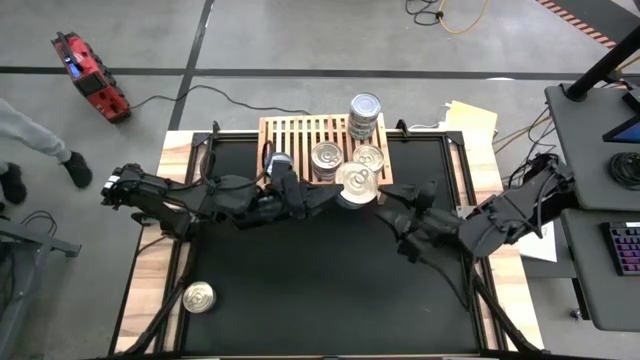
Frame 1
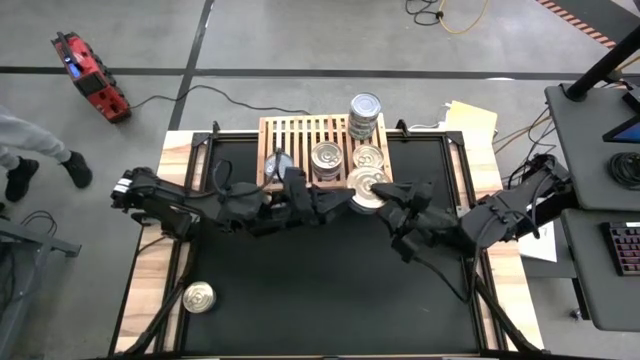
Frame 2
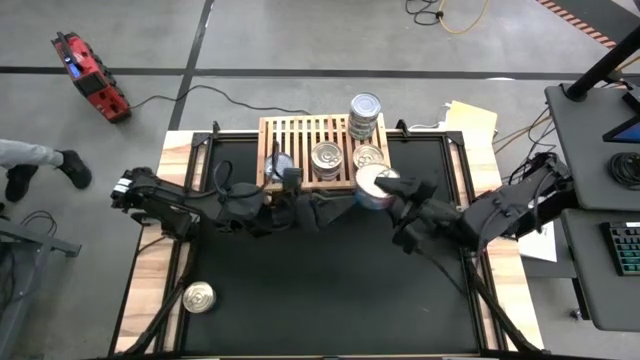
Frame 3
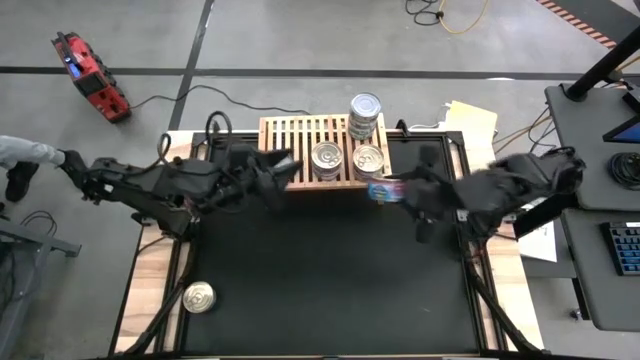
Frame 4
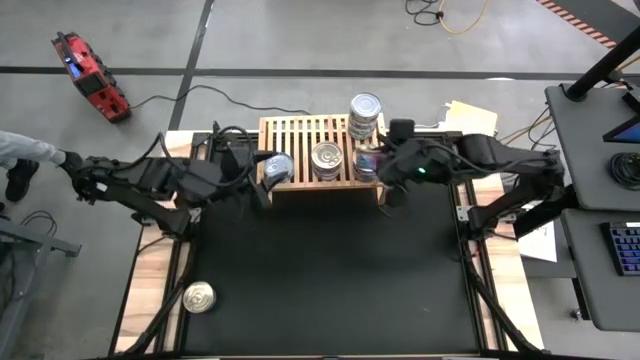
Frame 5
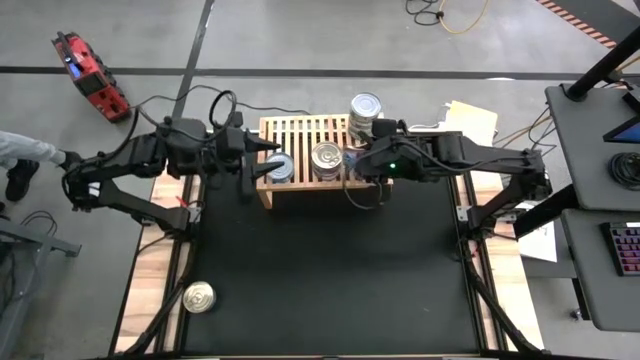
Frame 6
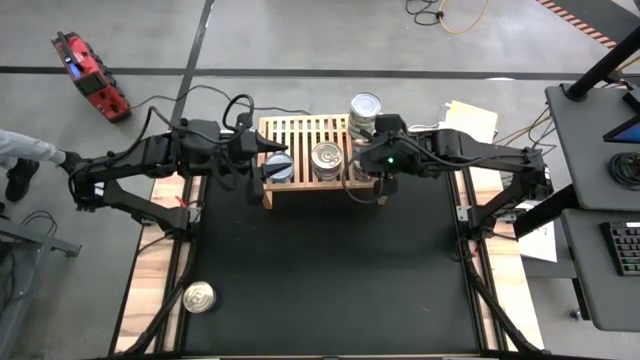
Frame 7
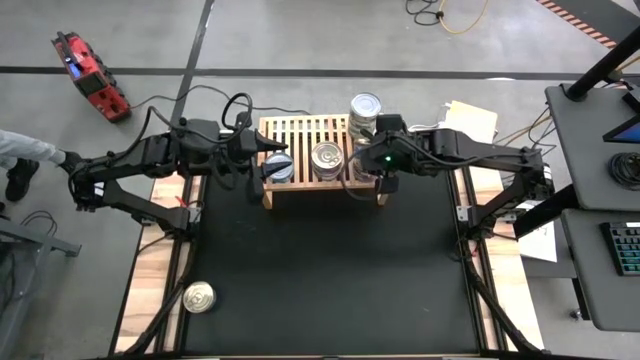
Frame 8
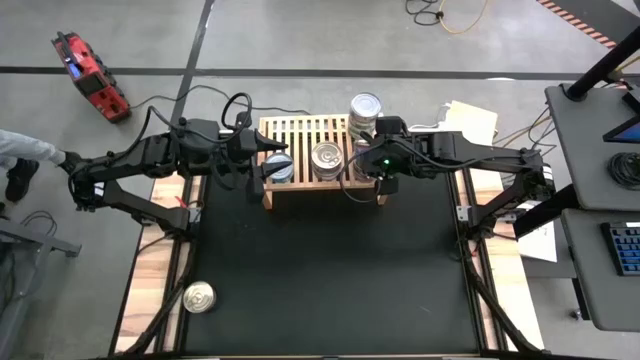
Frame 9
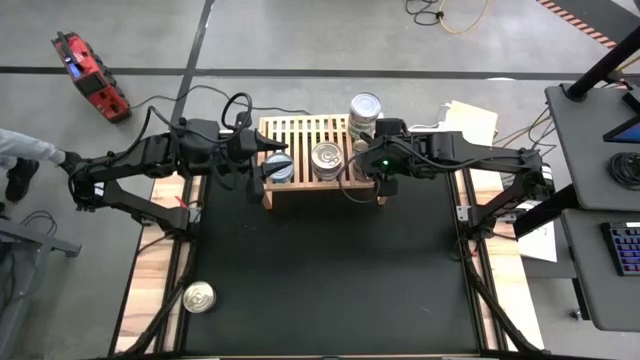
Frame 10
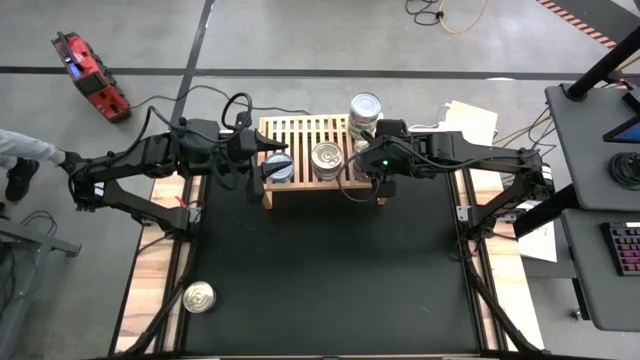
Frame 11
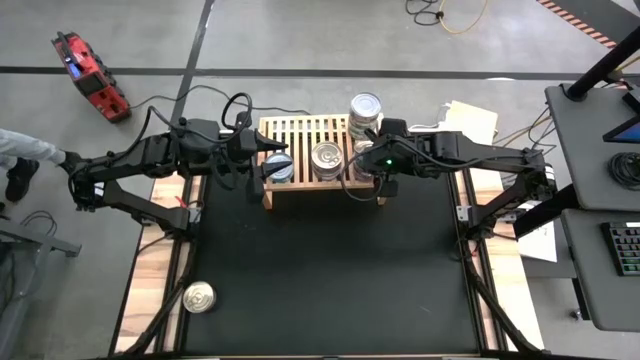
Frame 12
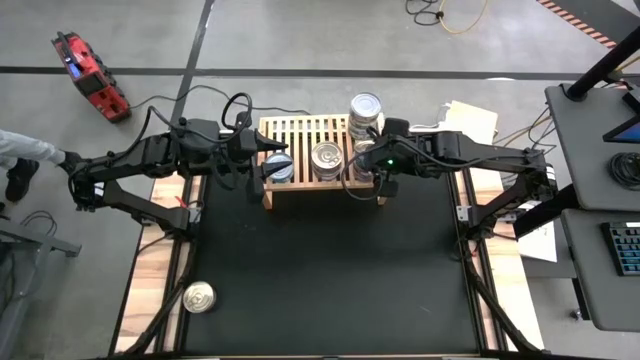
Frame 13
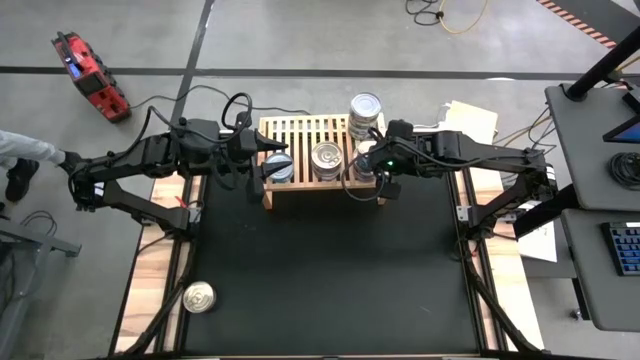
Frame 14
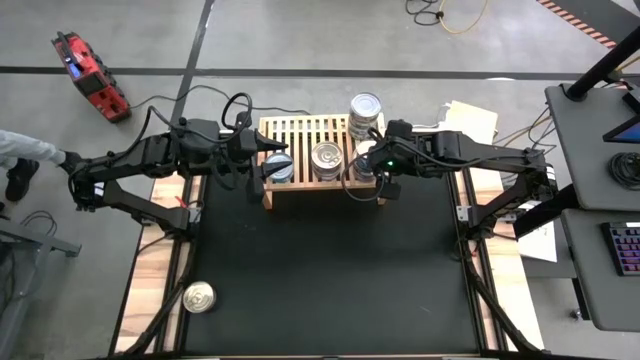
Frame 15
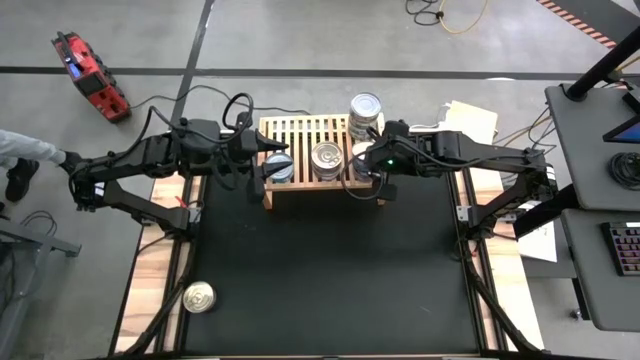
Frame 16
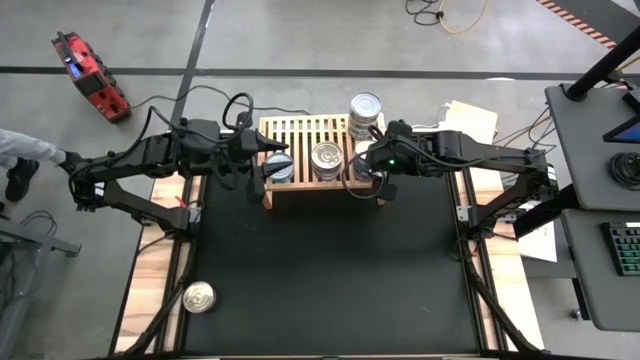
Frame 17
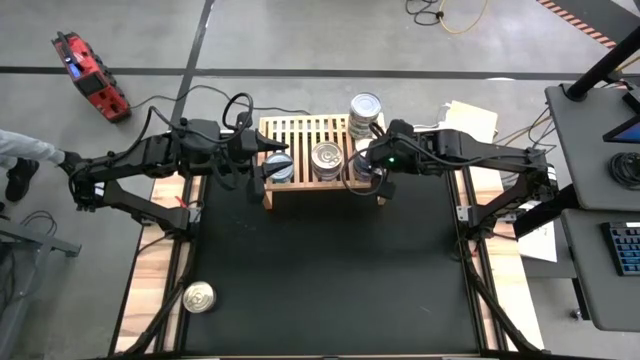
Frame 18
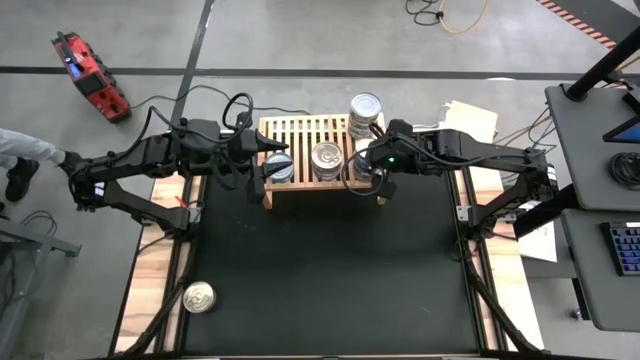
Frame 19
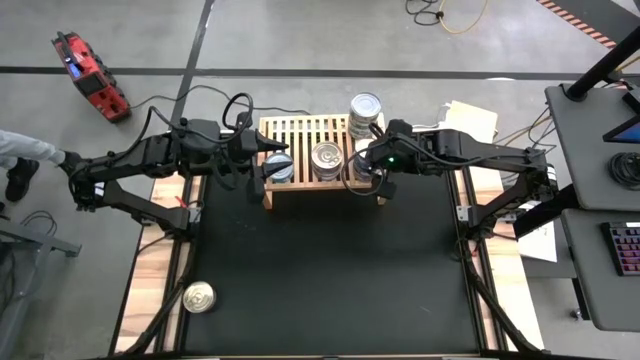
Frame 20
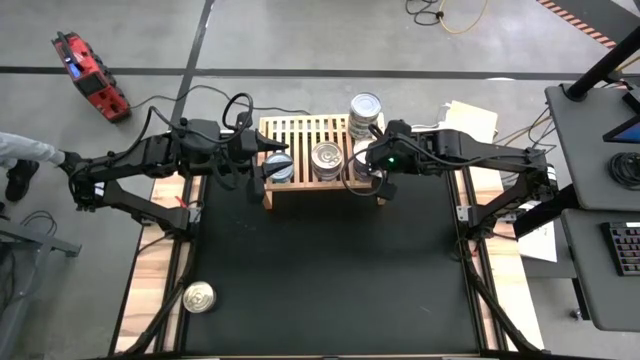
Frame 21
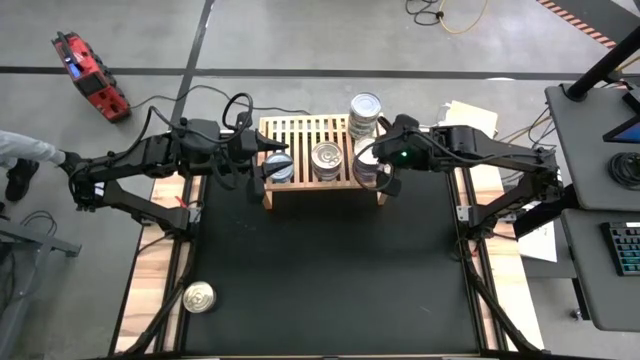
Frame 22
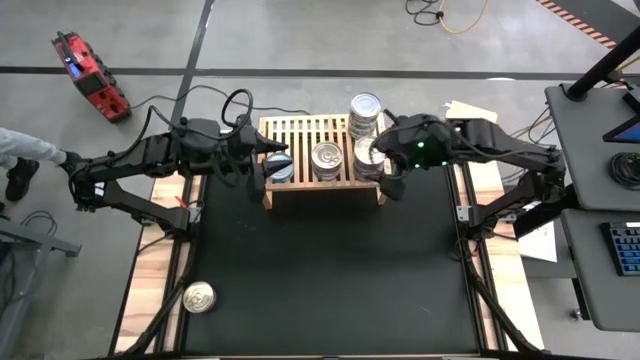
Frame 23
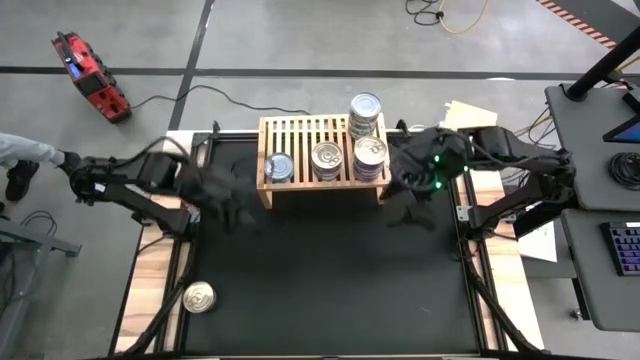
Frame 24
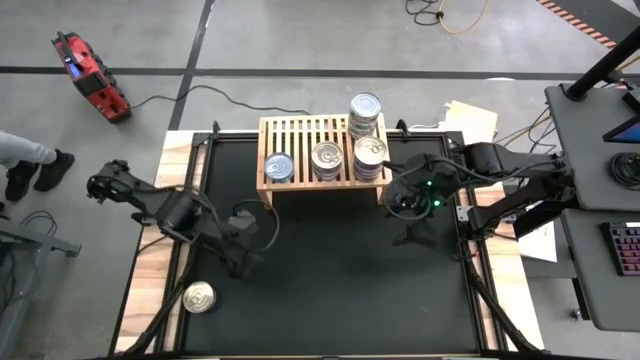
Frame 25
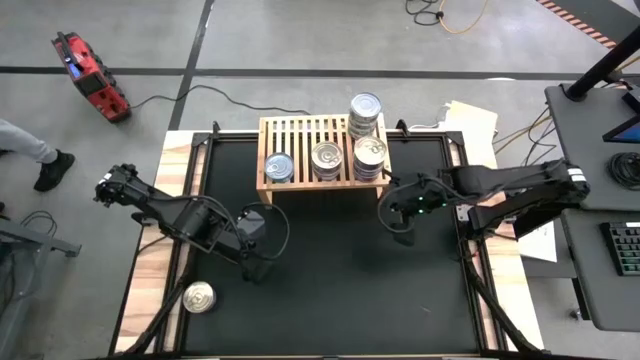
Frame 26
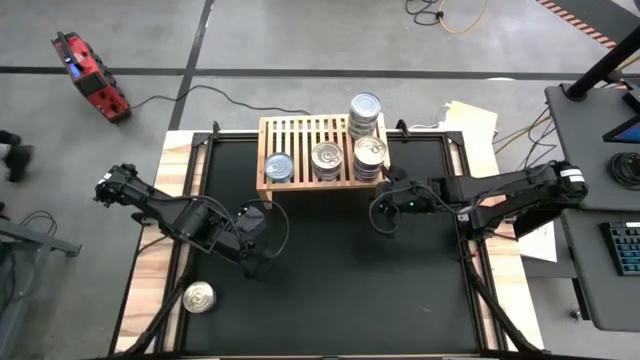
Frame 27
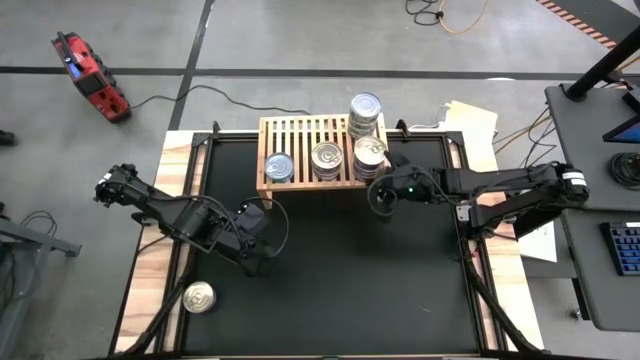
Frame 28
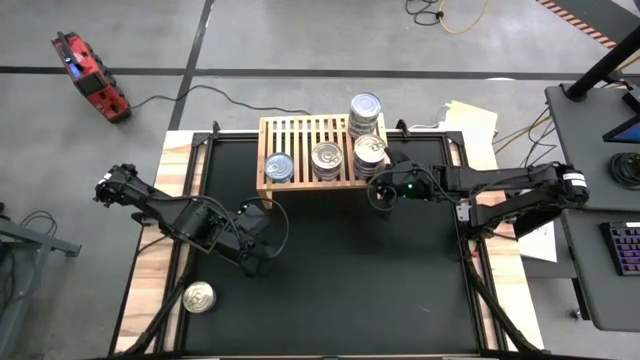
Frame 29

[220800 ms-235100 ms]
Task: Stack canned seafood by type on shelf
Stack the blue pink tuna can on top of the blue pink tuna can on the shelf

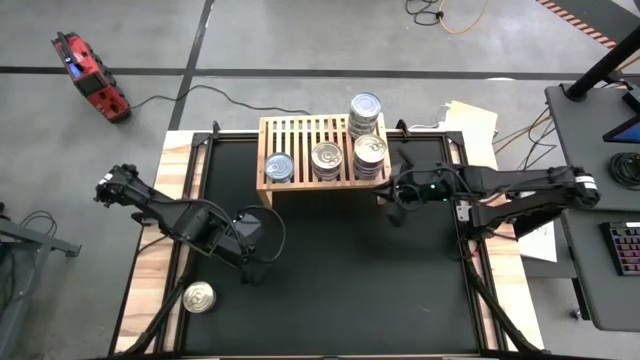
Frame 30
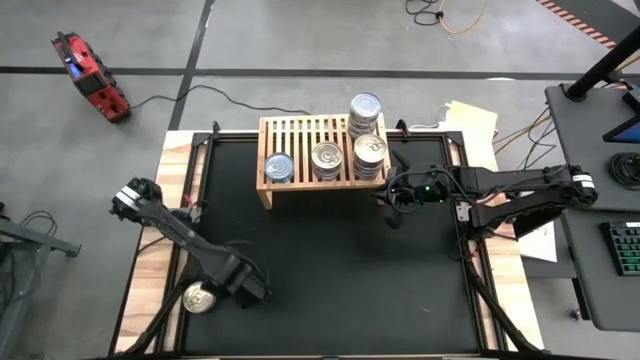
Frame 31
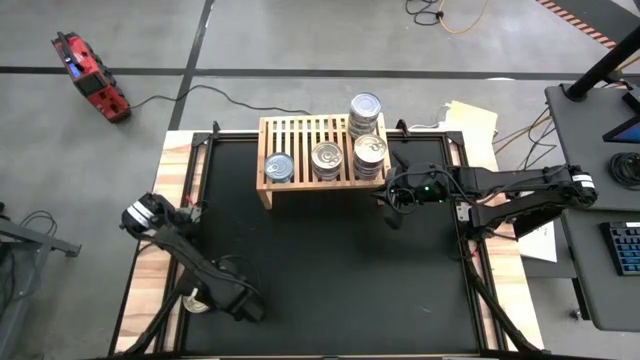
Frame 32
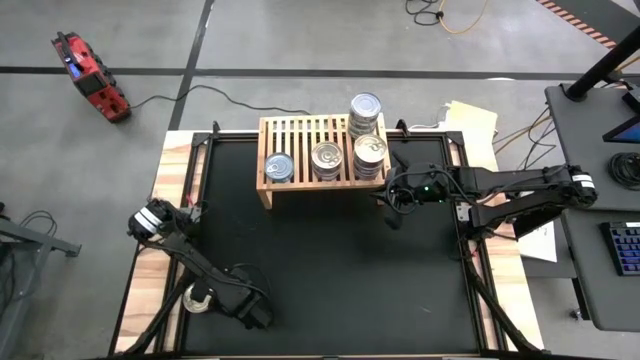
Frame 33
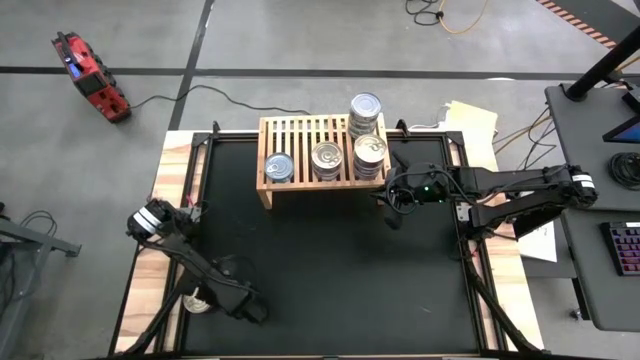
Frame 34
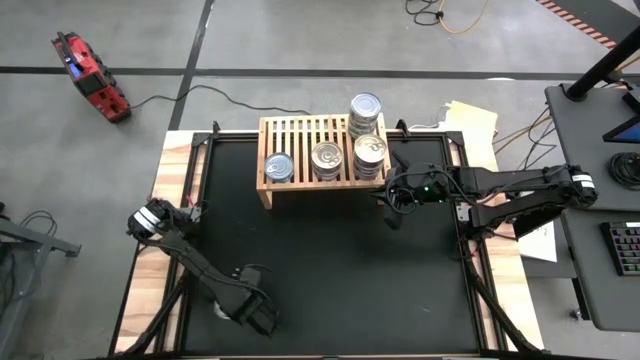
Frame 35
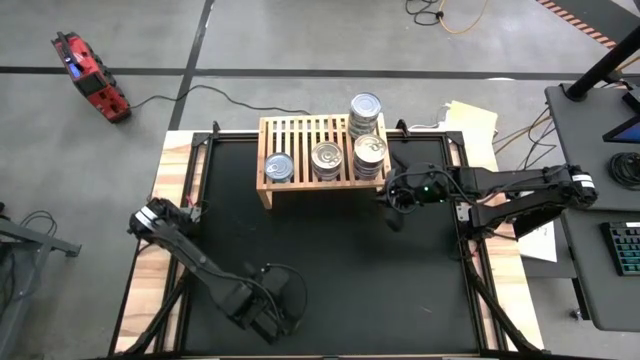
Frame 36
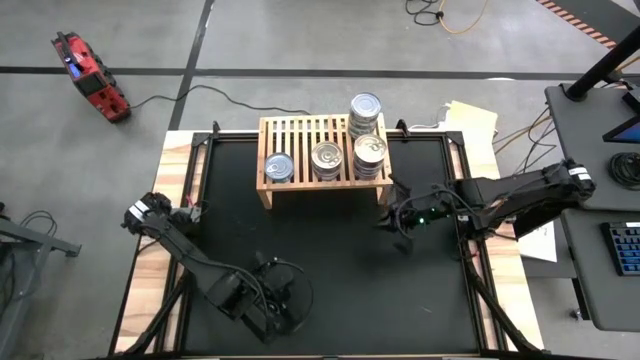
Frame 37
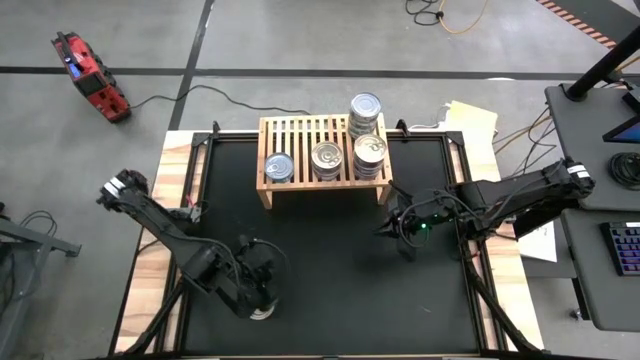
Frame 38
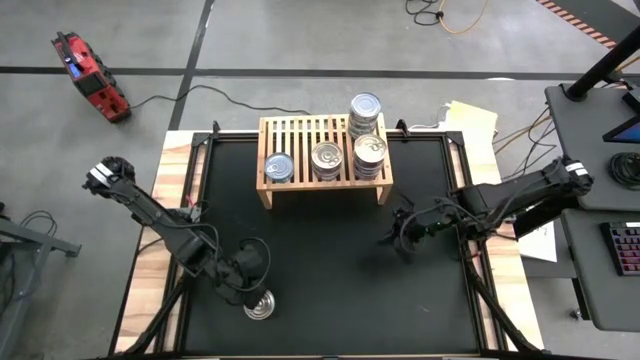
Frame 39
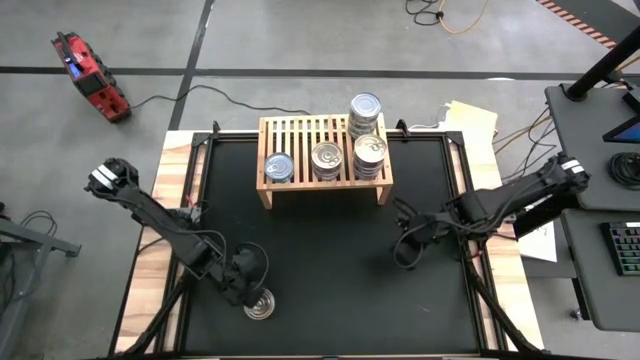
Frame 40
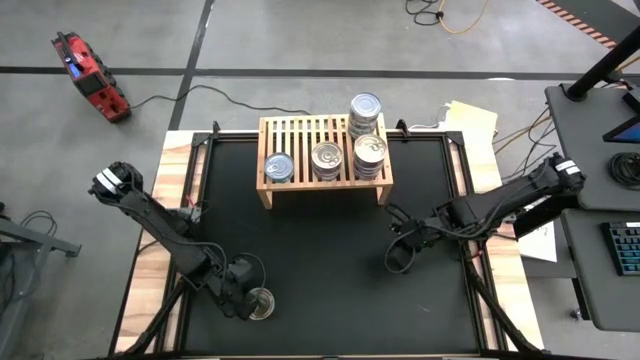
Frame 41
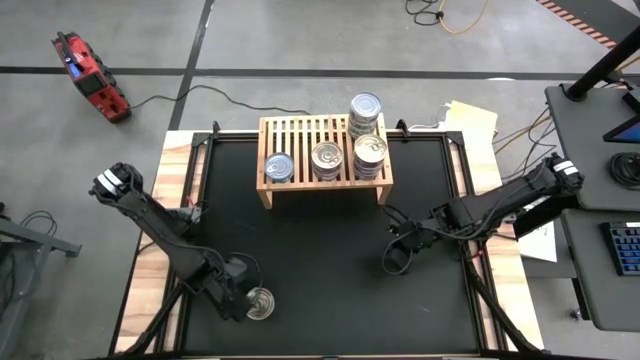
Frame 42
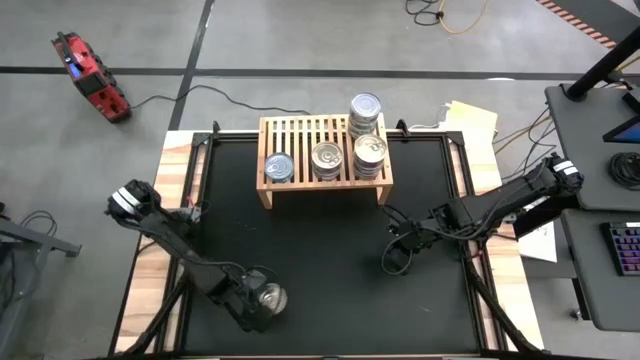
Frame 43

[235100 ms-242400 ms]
Stack the blue pink tuna can on top of the blue pink tuna can on the shelf
